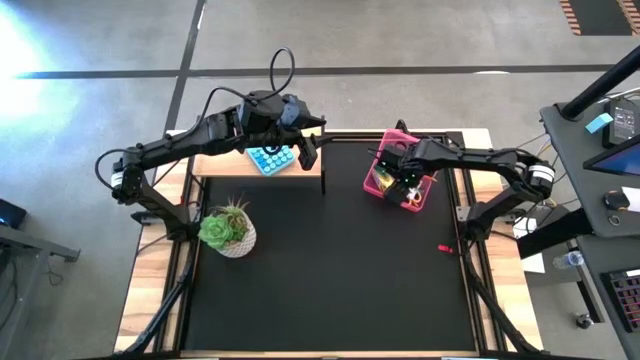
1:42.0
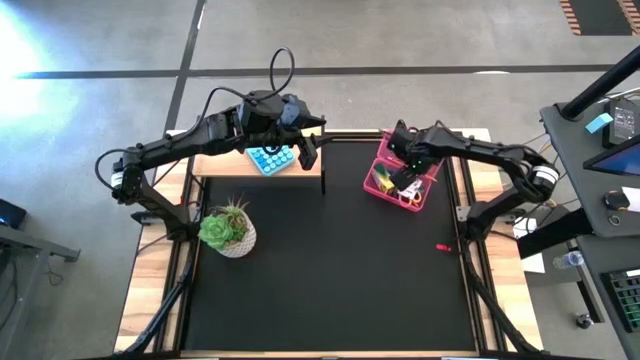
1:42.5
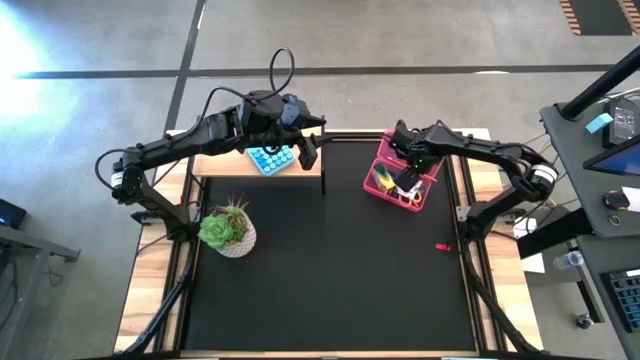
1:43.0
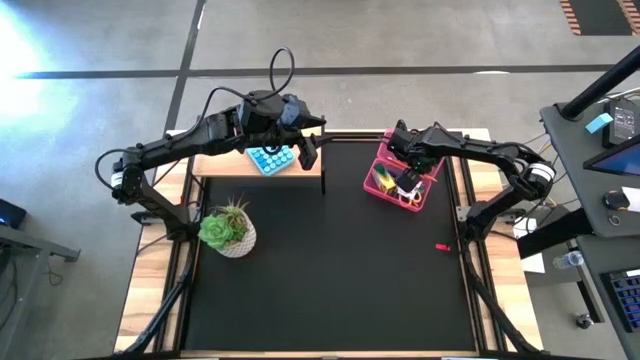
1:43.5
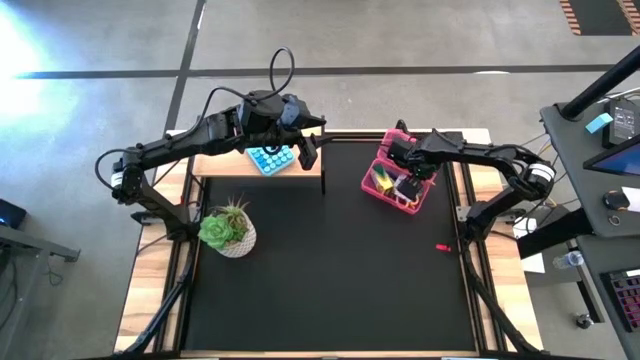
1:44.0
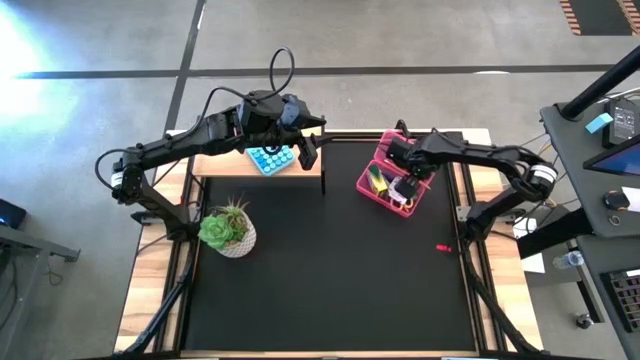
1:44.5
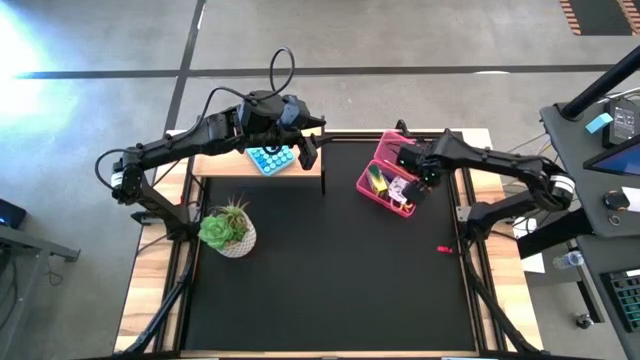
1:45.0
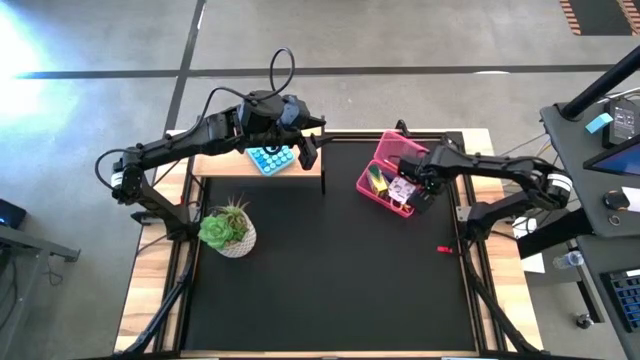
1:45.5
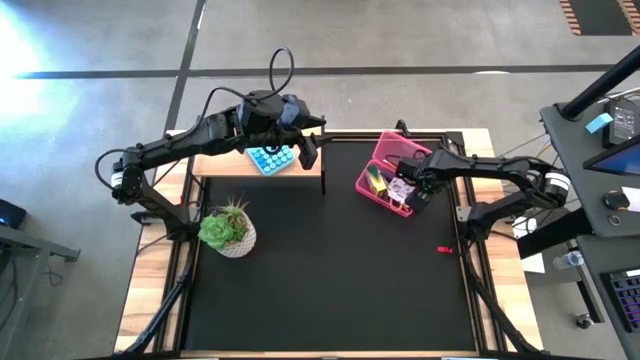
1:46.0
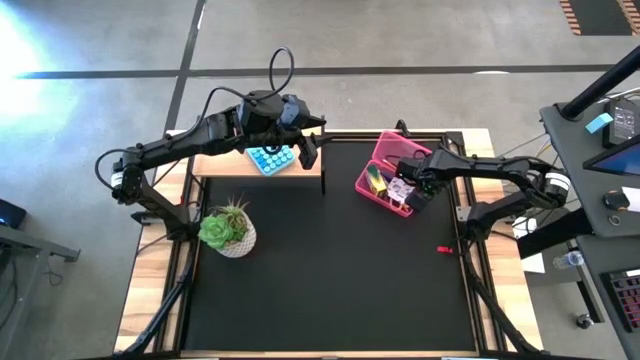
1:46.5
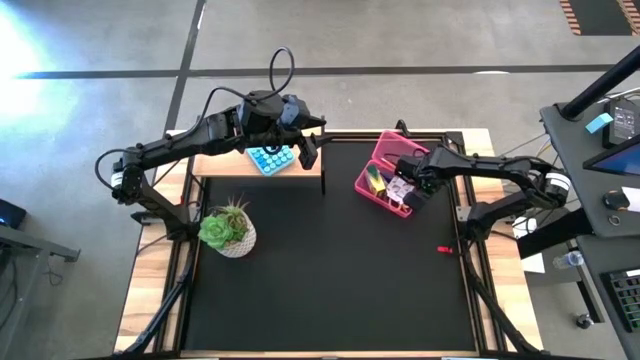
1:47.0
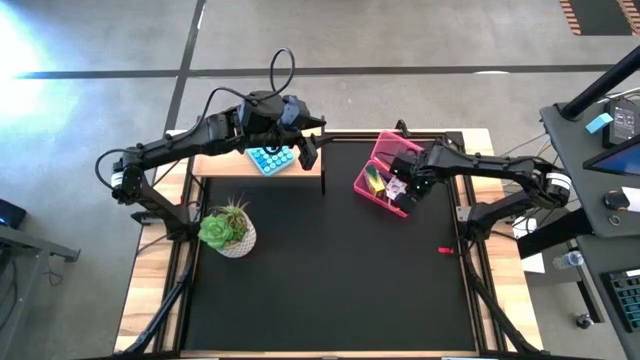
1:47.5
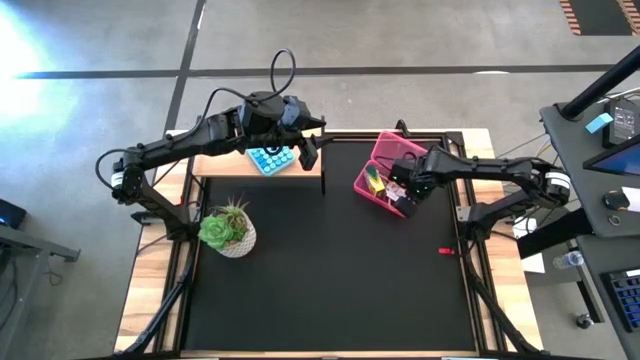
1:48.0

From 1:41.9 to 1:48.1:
Task: Pack school essentials
Adjust the yellow pencil in the pink supply box

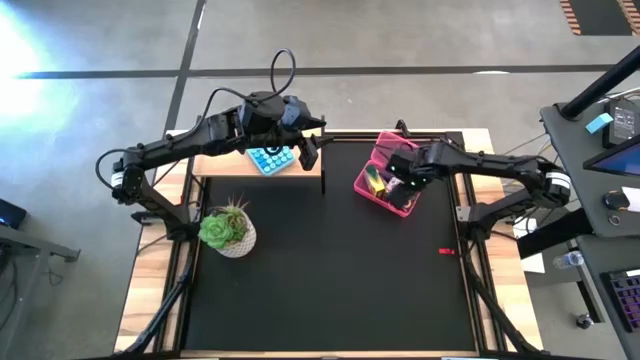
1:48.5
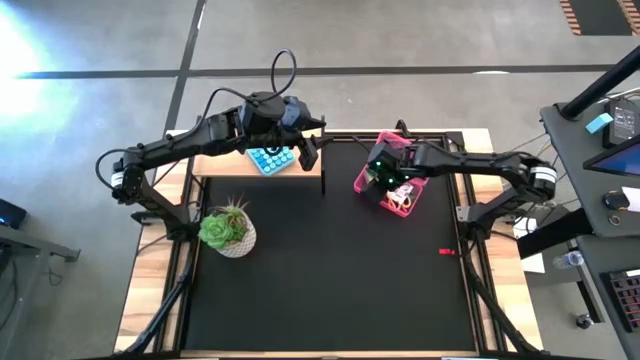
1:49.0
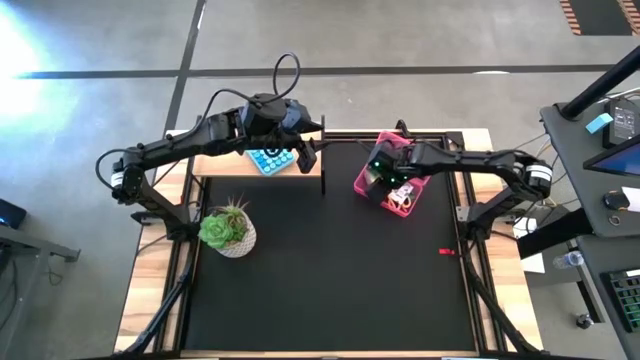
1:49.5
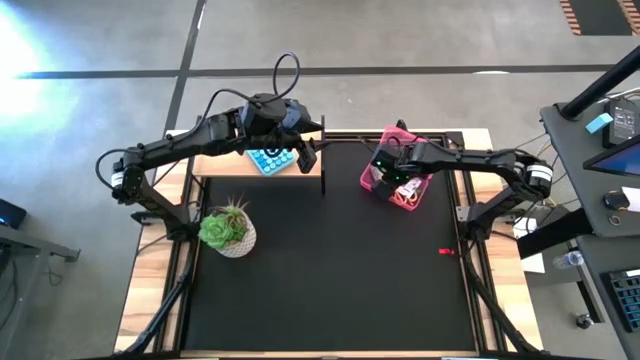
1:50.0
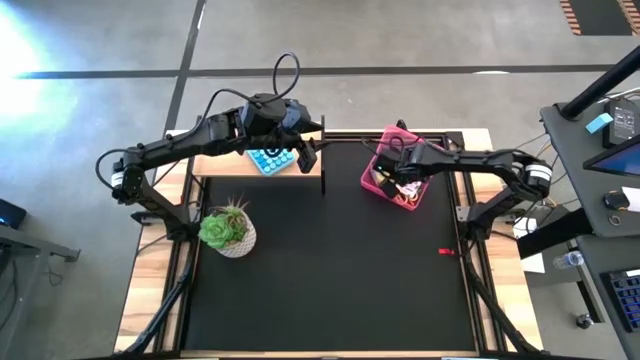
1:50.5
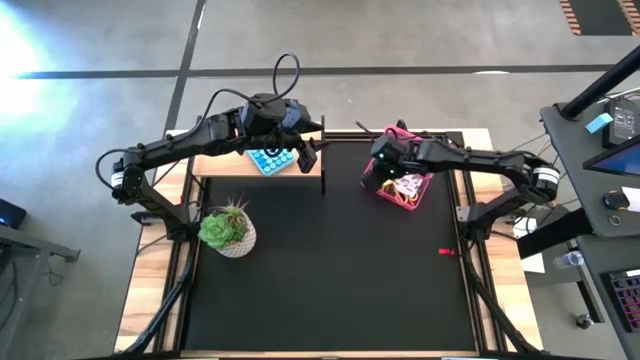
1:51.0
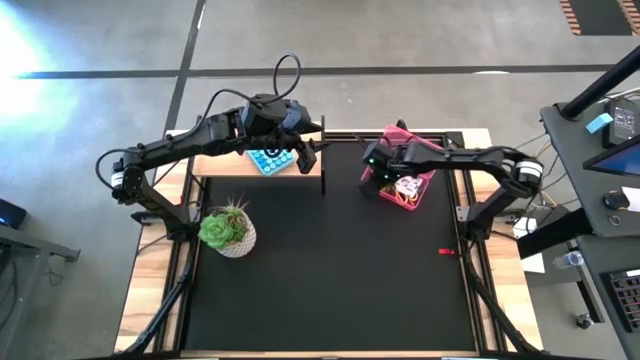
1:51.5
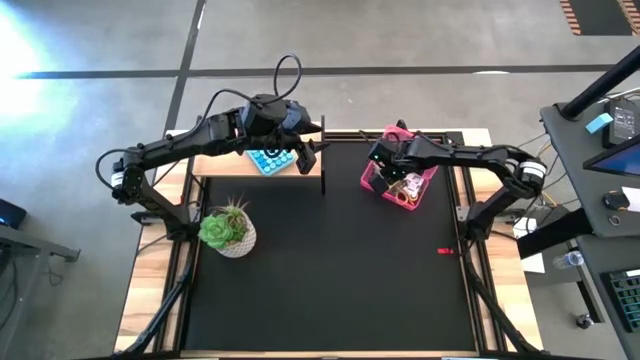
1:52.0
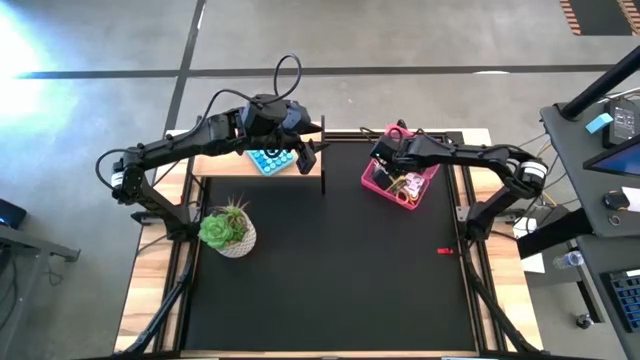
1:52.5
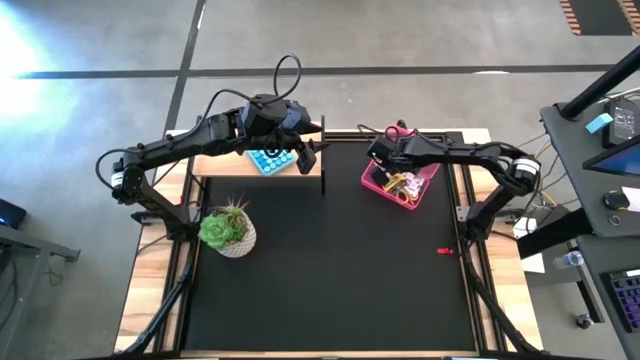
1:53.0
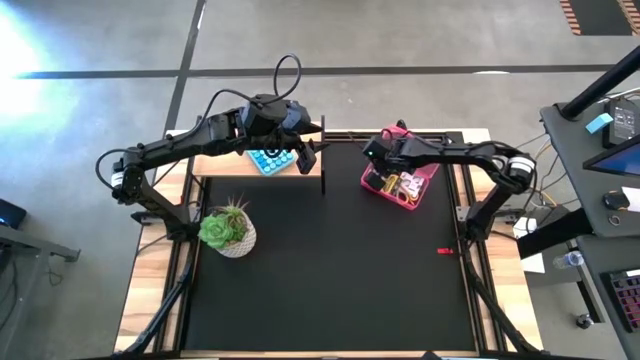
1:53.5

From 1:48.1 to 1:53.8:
Adjust the crayon box in the pink supply box

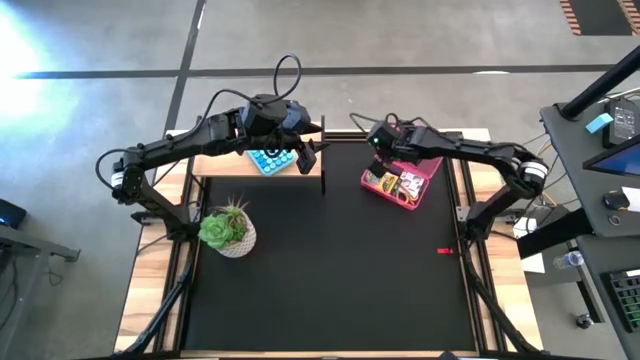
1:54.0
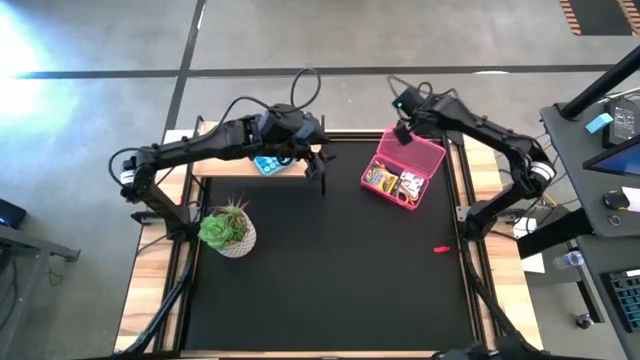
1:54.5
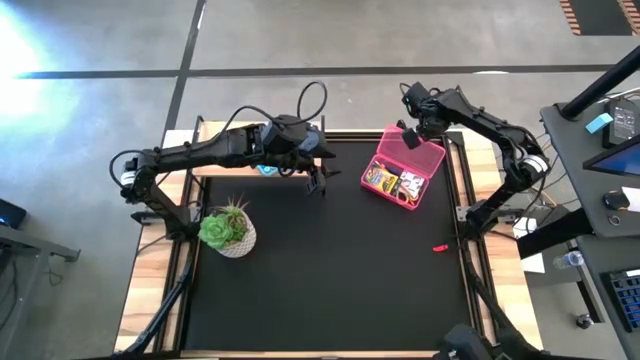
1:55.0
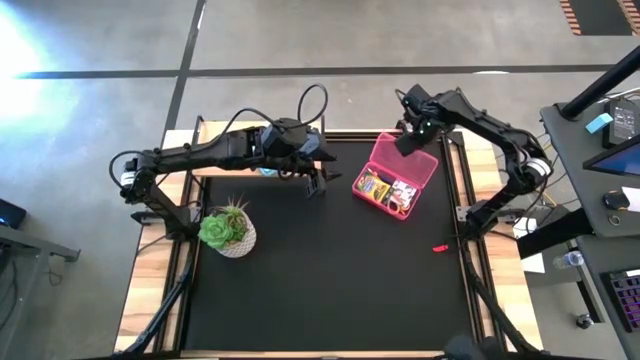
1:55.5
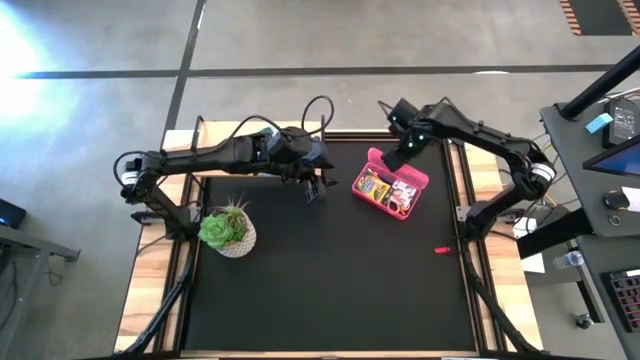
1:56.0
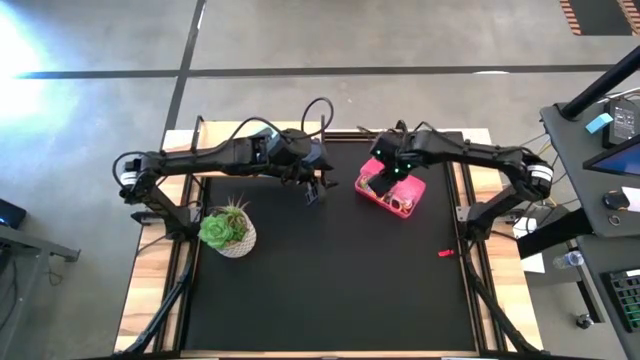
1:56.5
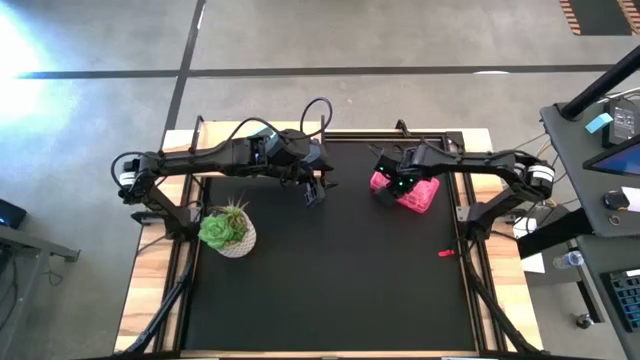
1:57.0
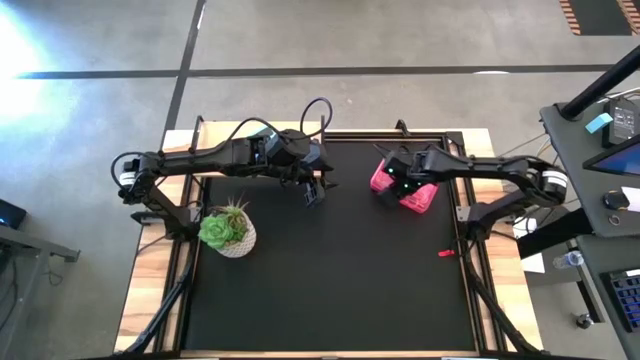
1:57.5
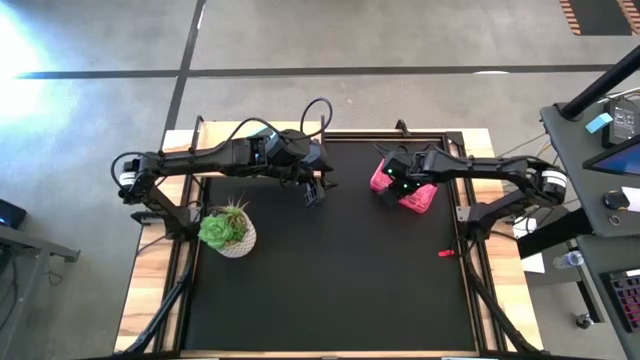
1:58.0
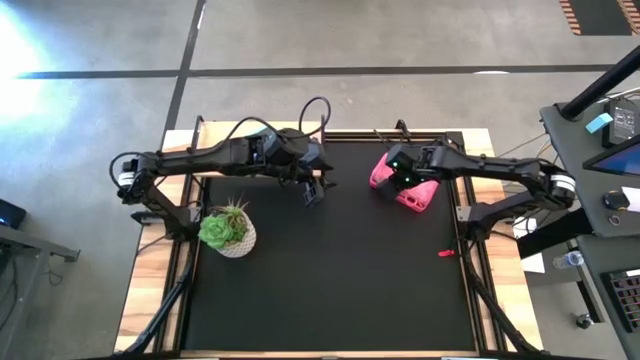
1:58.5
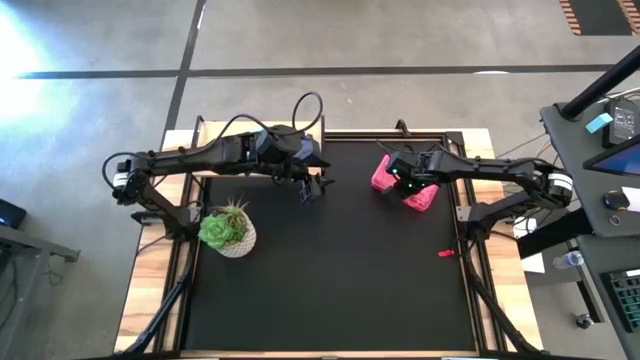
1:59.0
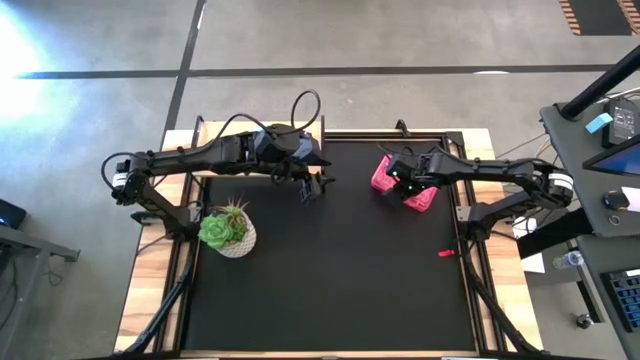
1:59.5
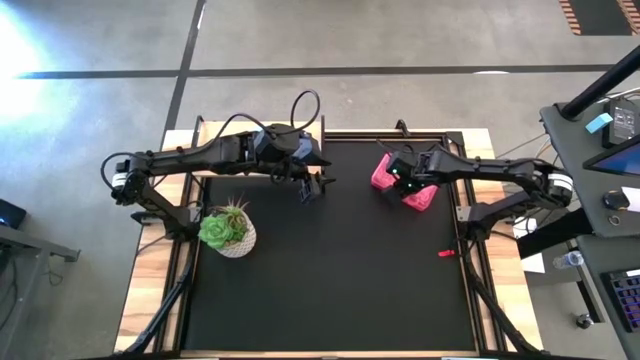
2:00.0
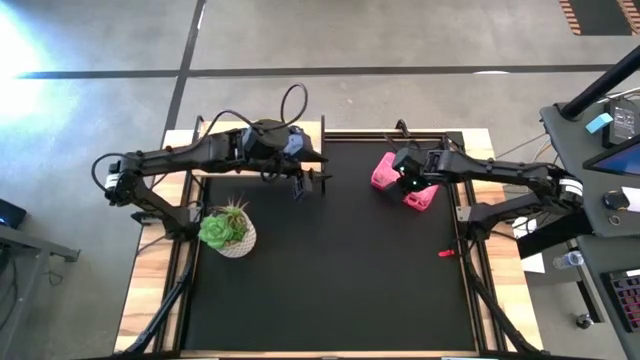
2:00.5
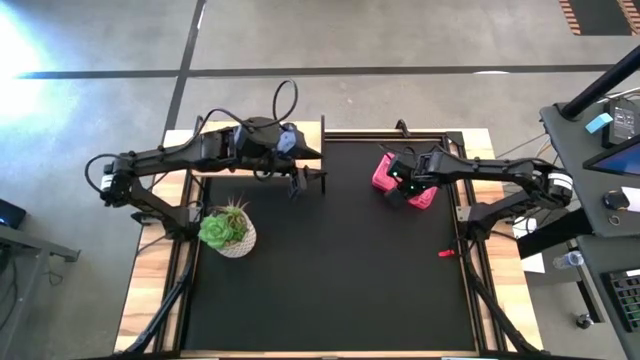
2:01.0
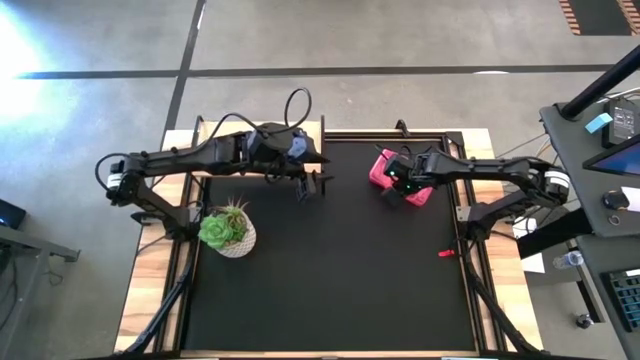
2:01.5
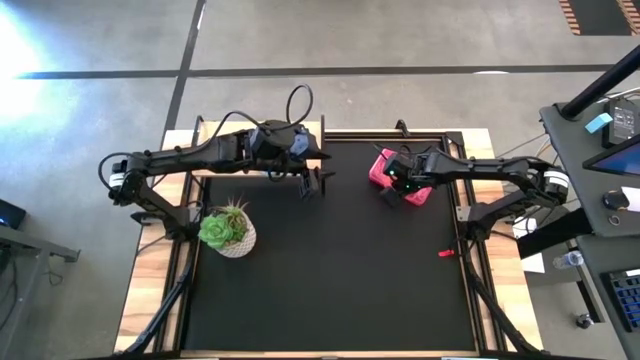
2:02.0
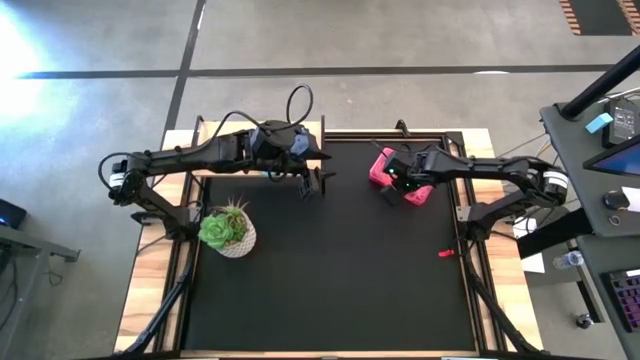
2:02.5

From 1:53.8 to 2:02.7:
Close the pink supply box
